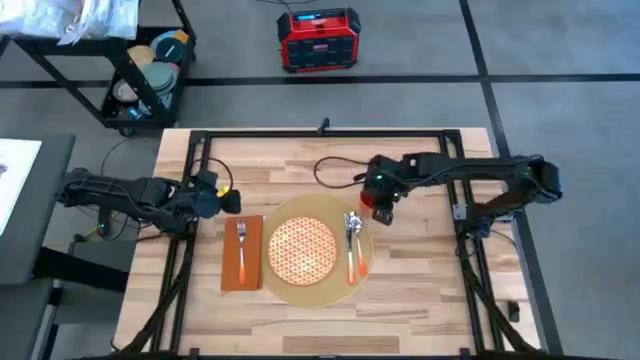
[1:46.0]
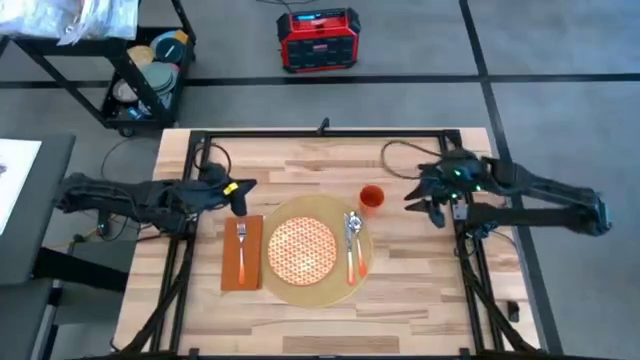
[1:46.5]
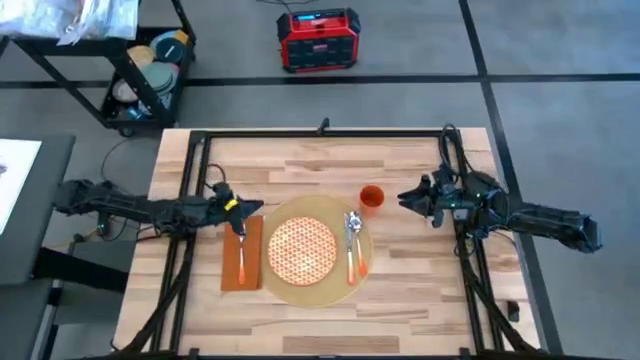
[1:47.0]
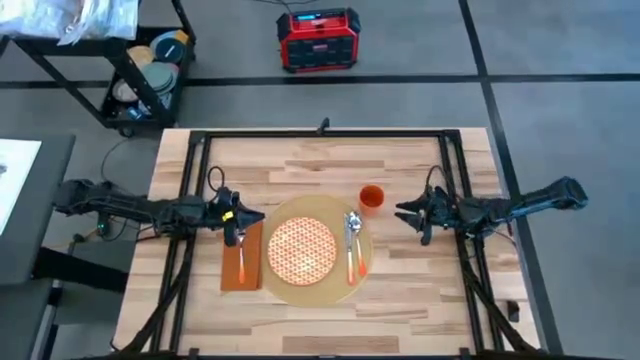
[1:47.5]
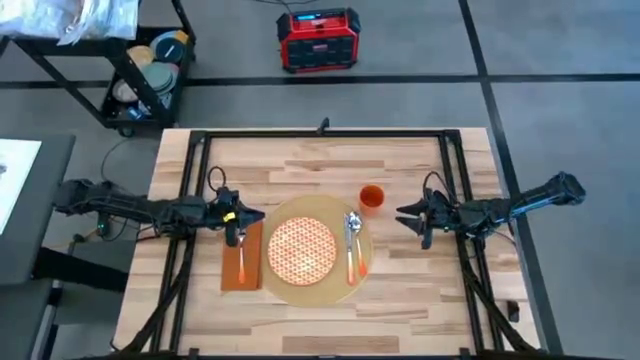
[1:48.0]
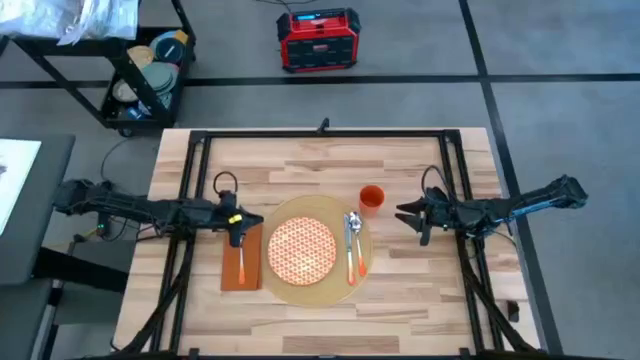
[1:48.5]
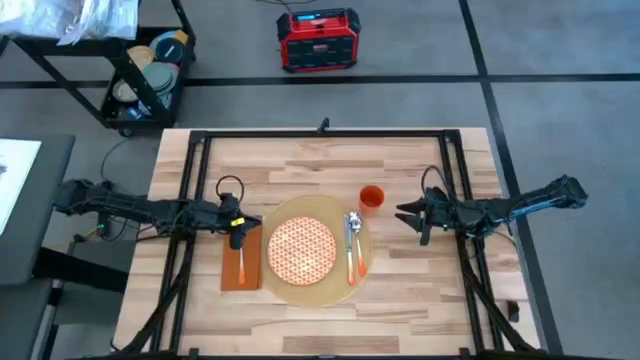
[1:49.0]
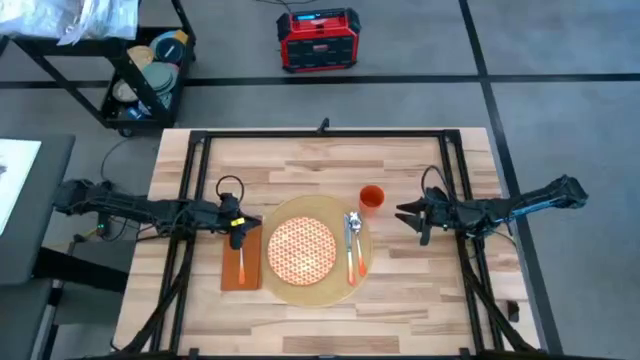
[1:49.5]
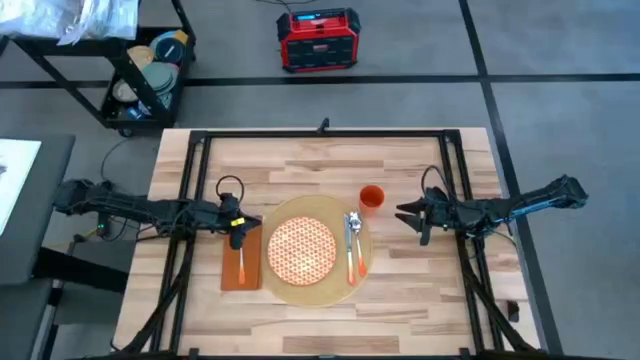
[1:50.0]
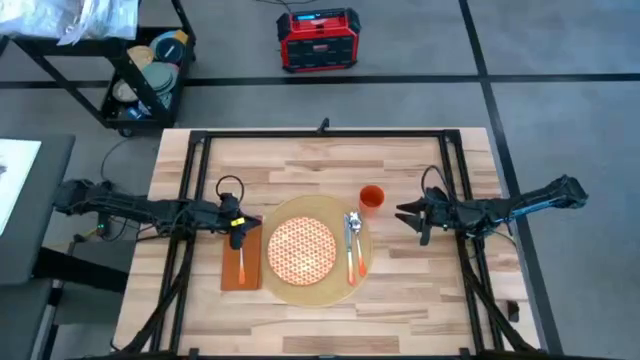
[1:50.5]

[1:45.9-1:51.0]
Task: Set table place
Return to Home Position

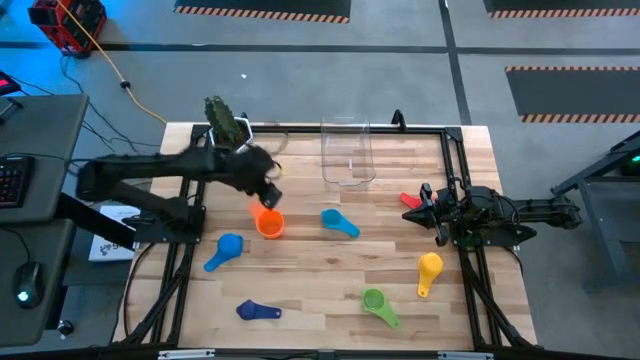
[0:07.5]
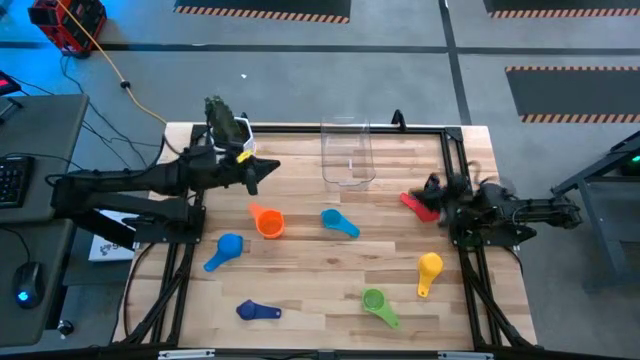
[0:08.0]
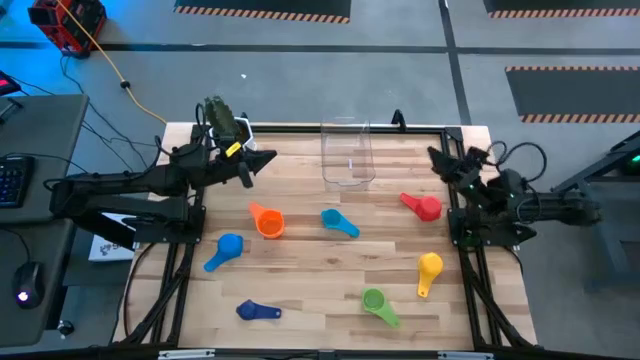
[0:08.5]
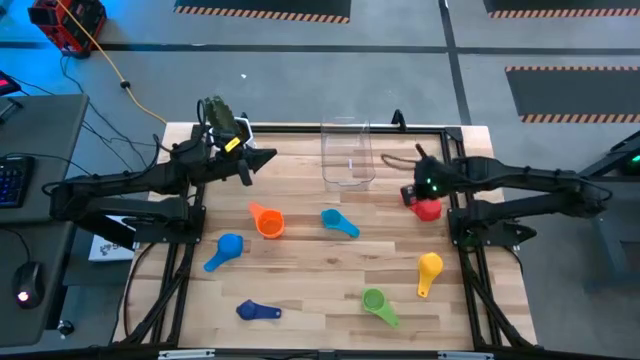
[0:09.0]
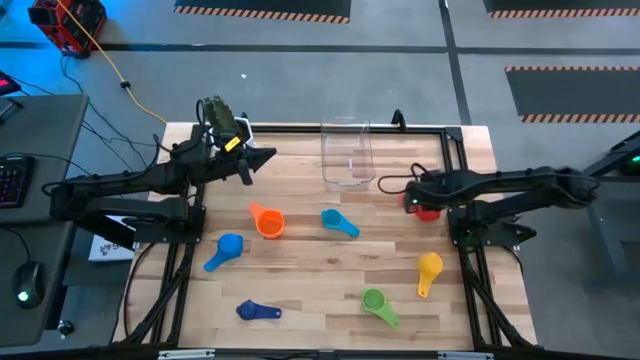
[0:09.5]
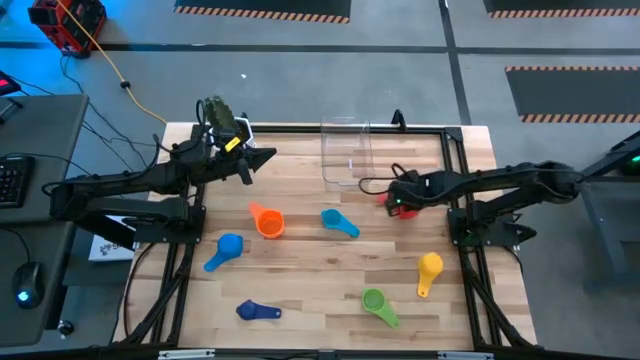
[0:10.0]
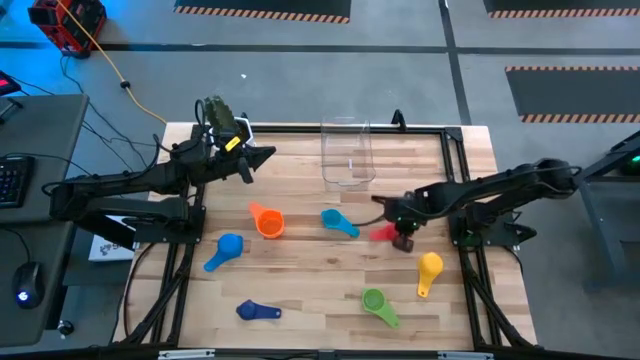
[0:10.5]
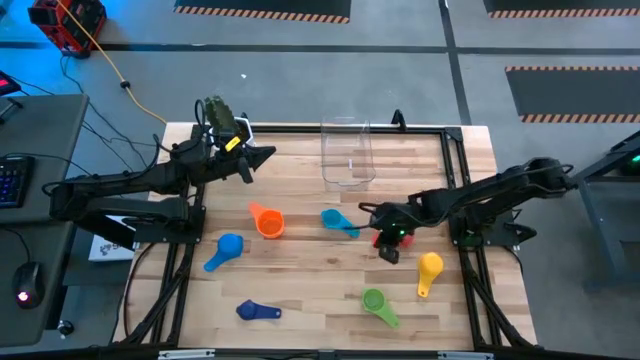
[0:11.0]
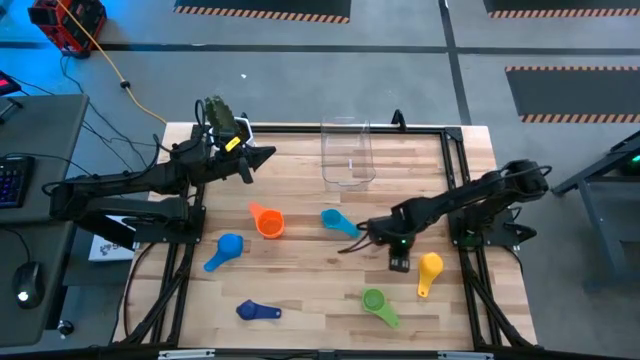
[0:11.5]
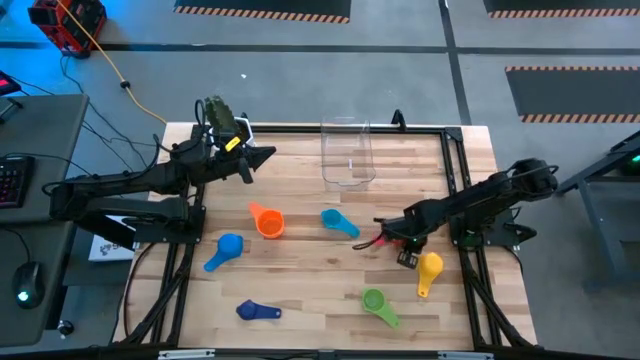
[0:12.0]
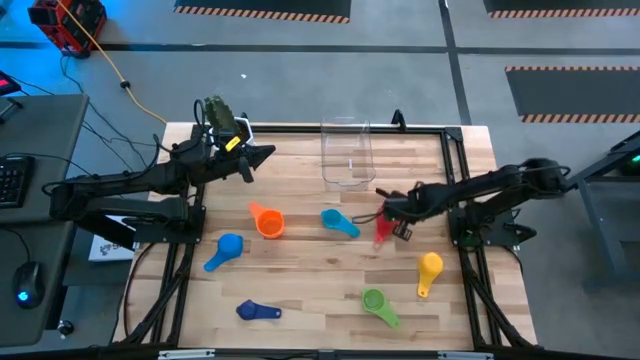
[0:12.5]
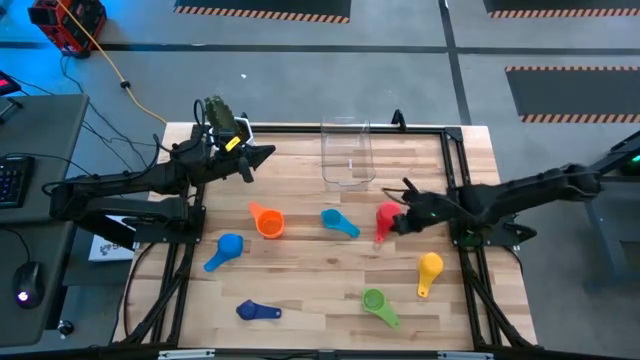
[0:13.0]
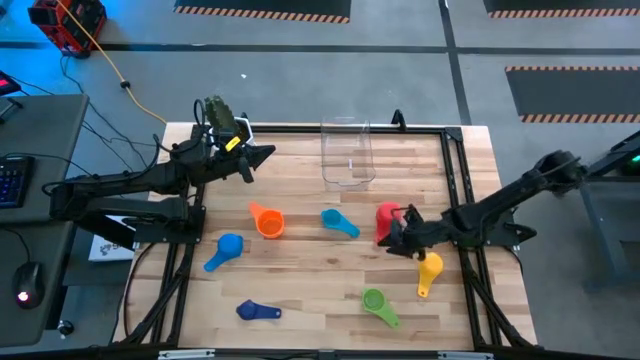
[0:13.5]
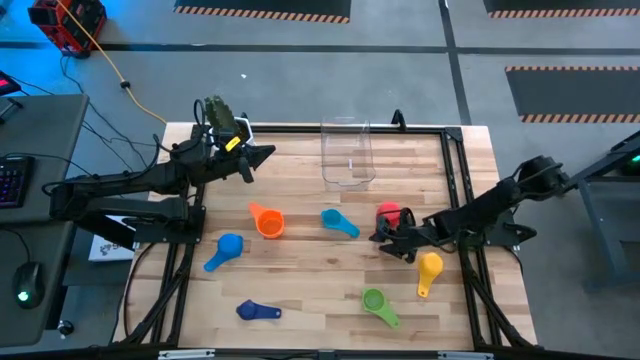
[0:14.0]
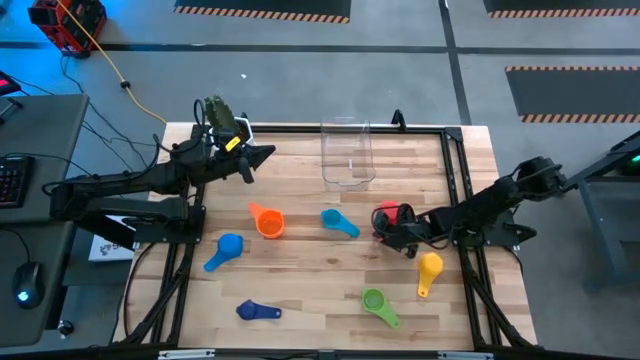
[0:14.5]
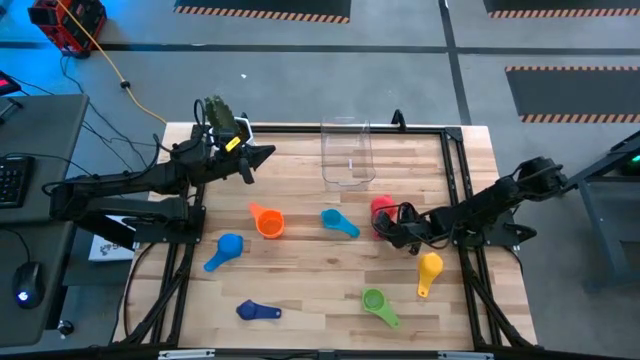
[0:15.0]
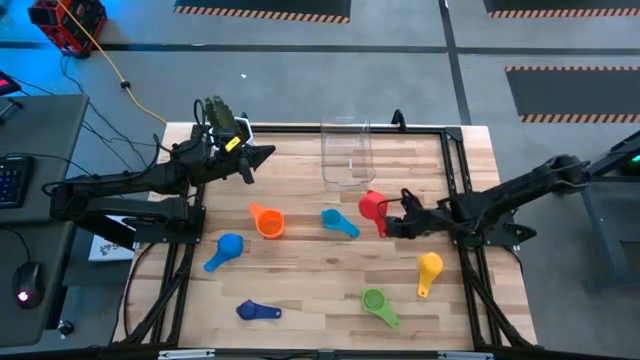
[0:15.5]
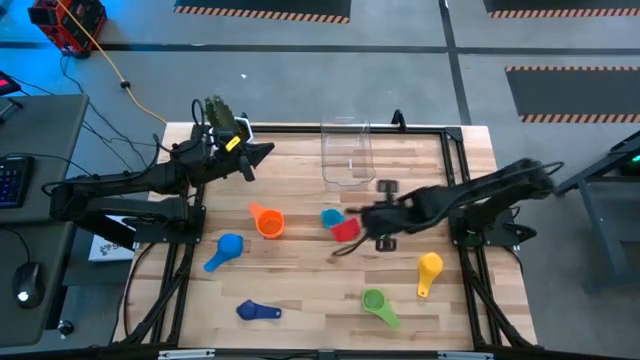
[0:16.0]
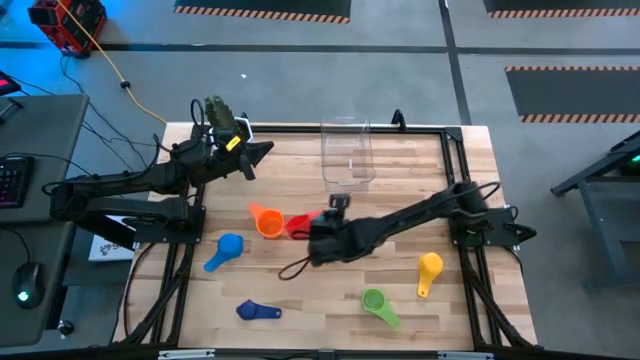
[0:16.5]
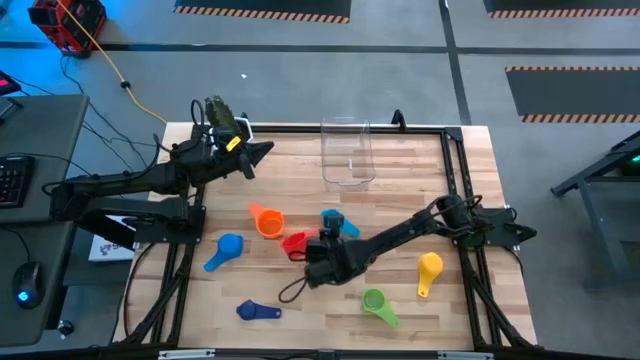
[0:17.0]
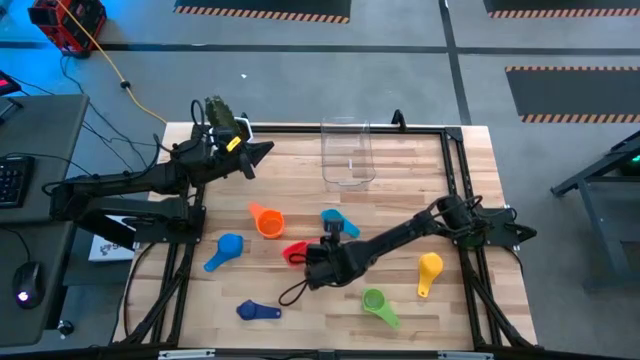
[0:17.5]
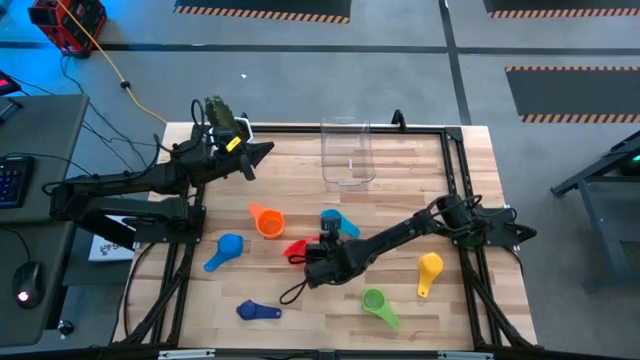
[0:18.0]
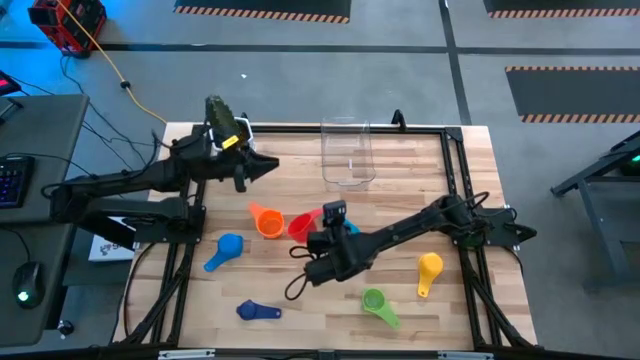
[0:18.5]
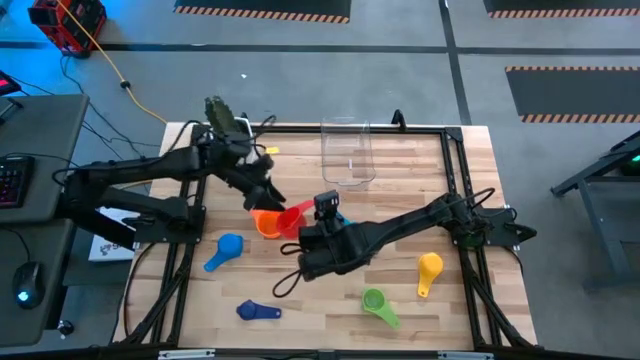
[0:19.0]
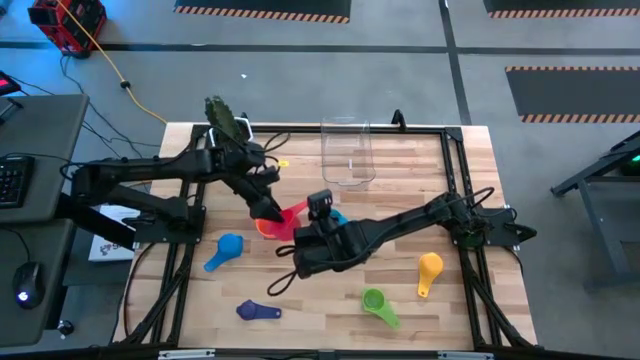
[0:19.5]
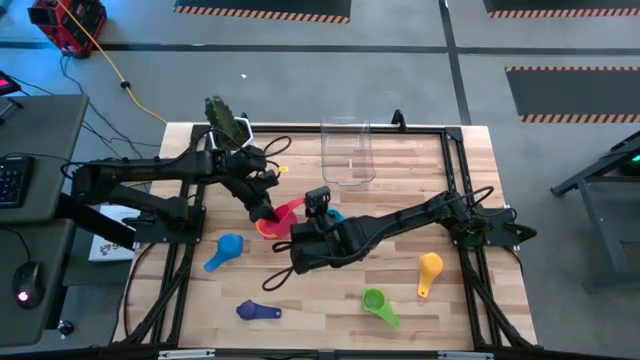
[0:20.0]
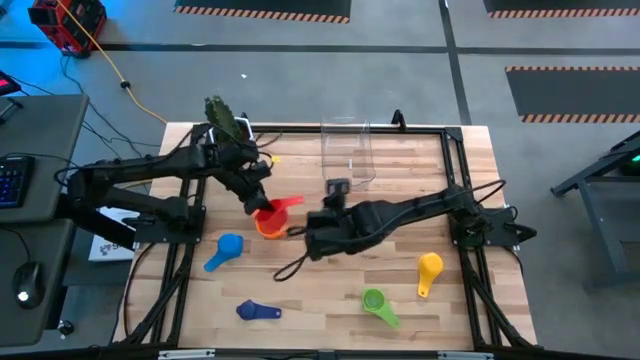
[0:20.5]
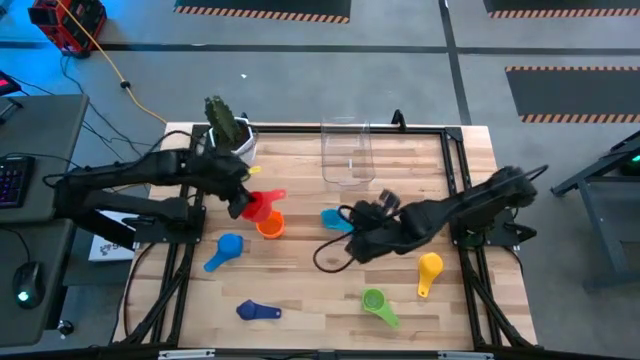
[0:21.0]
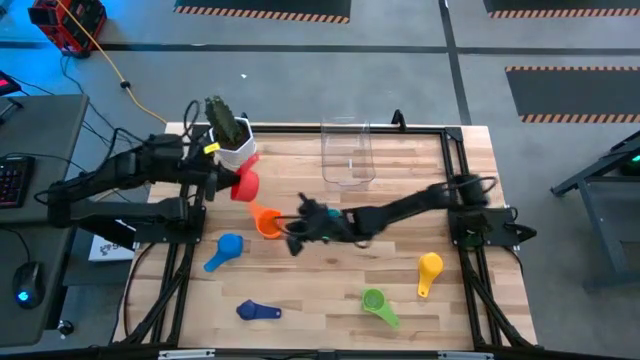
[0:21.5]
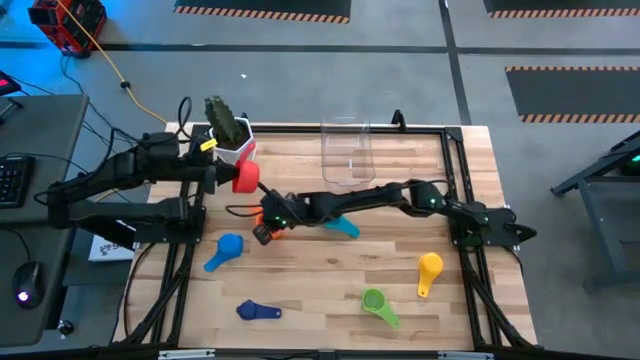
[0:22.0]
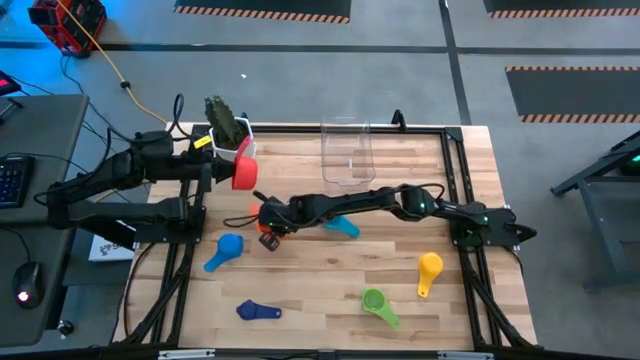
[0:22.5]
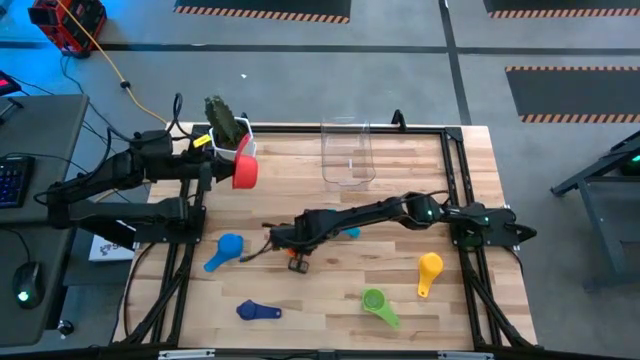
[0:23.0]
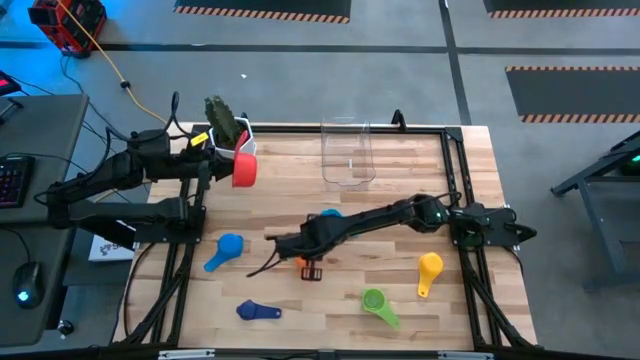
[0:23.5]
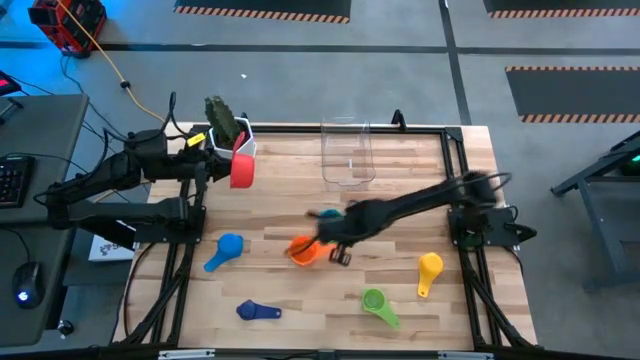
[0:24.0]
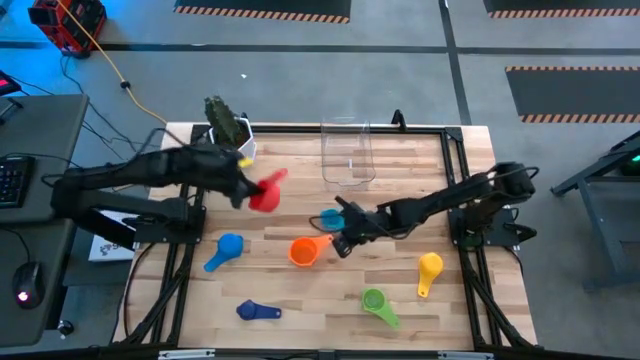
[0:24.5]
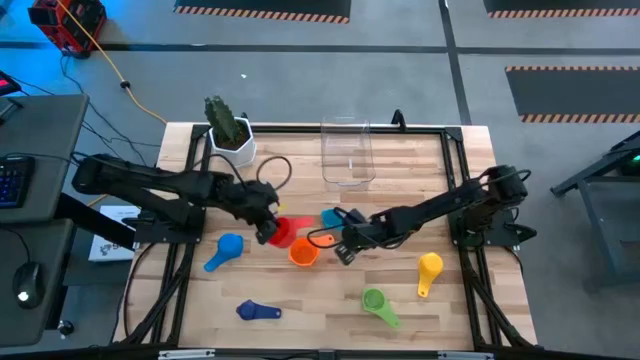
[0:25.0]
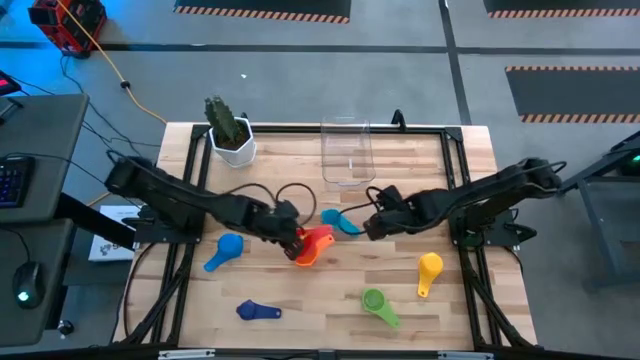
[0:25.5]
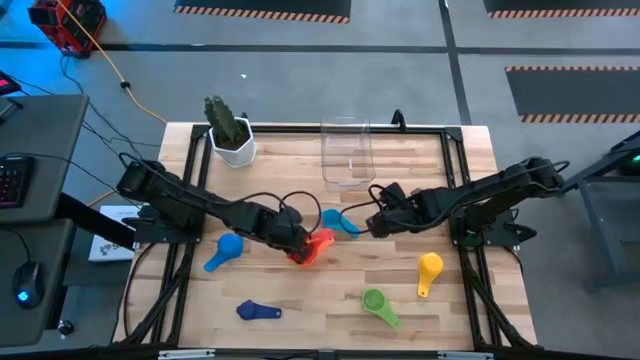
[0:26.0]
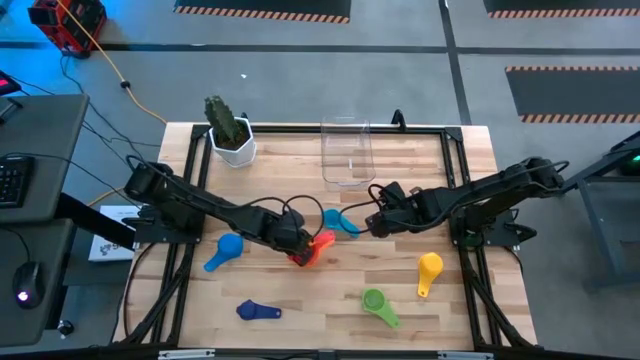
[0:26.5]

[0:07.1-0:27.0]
Task: Nest measuring cups in basket
Stack the red measuring cup on top of the orange measuring cup
